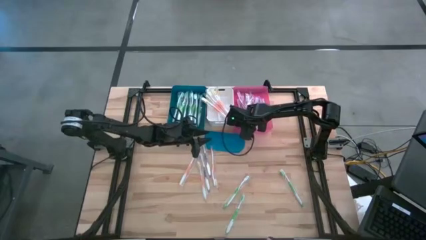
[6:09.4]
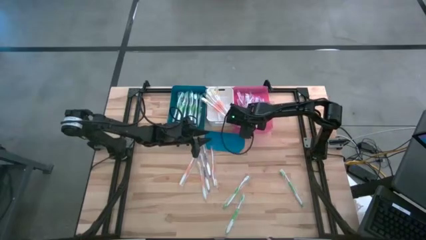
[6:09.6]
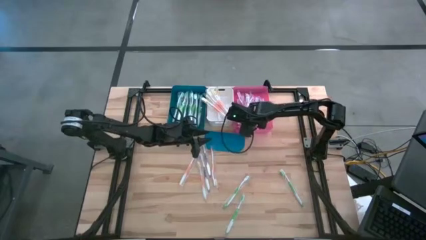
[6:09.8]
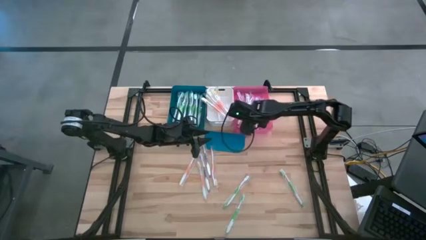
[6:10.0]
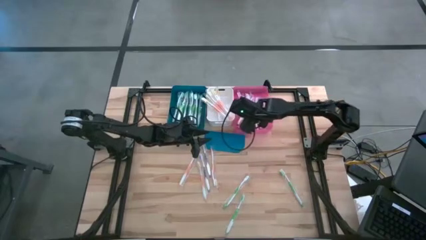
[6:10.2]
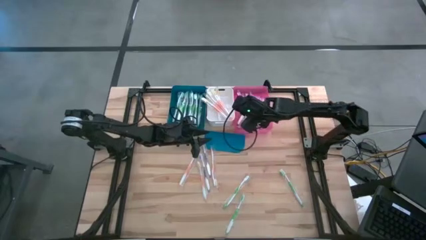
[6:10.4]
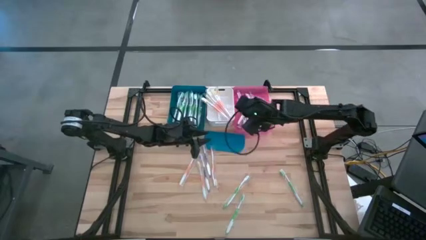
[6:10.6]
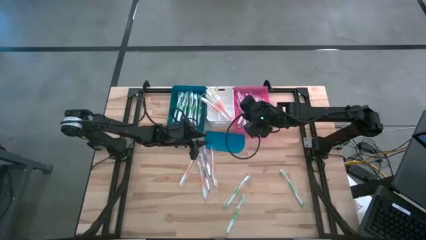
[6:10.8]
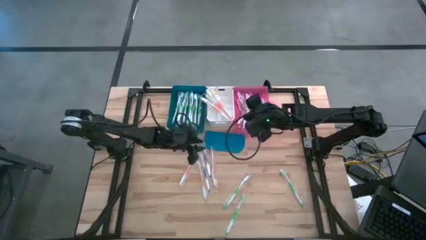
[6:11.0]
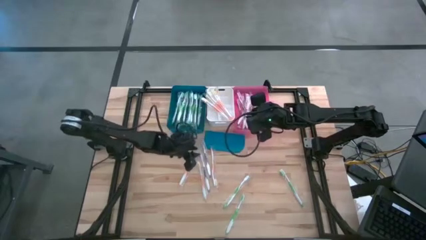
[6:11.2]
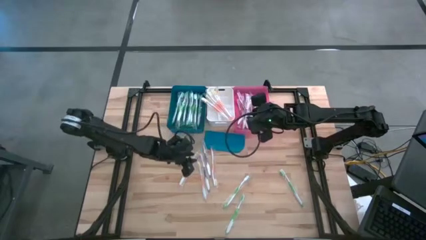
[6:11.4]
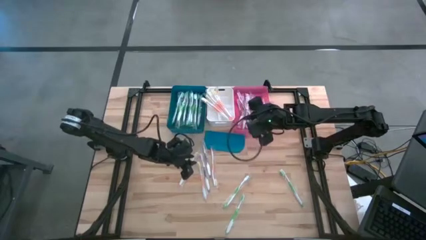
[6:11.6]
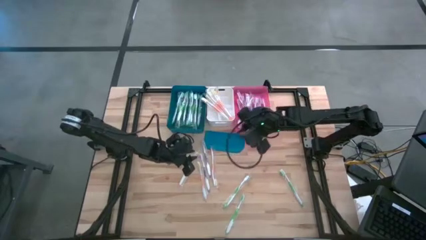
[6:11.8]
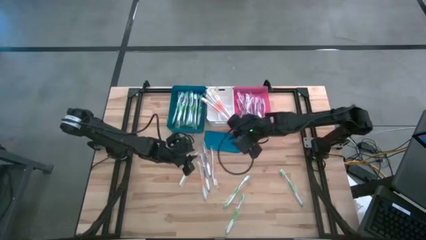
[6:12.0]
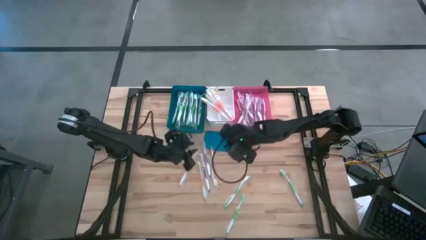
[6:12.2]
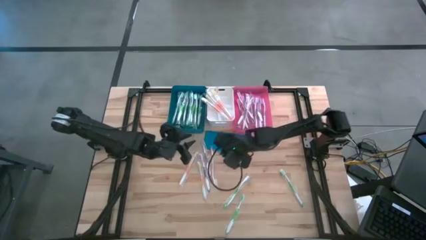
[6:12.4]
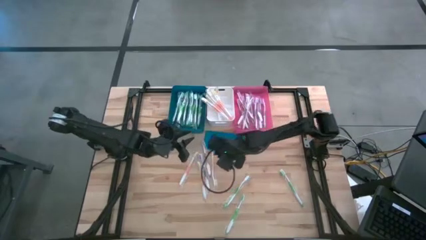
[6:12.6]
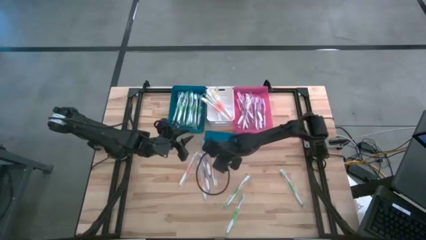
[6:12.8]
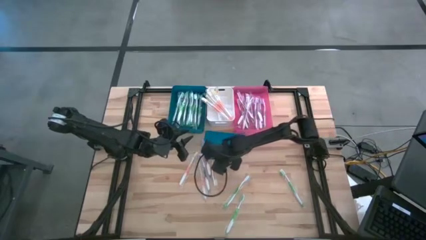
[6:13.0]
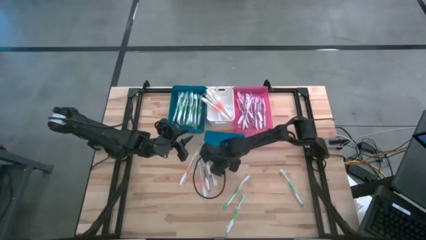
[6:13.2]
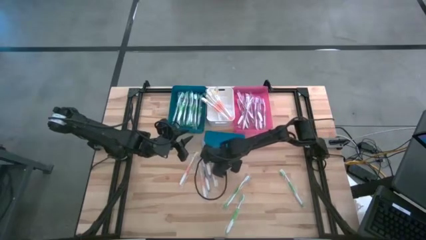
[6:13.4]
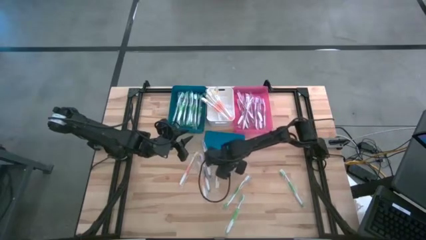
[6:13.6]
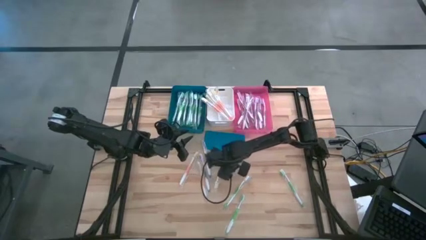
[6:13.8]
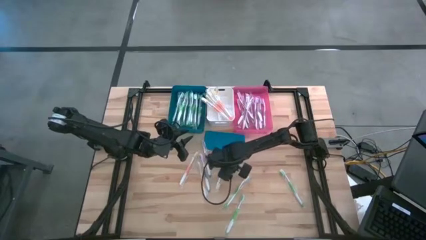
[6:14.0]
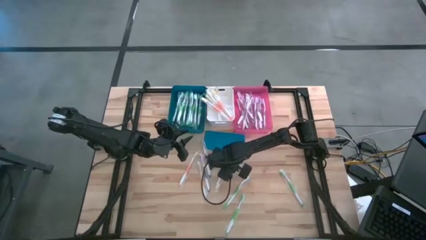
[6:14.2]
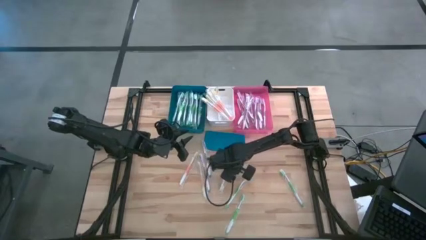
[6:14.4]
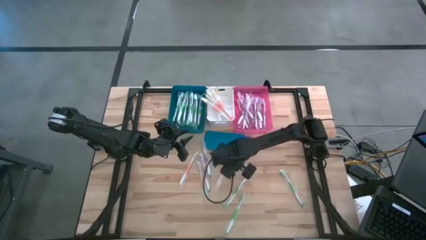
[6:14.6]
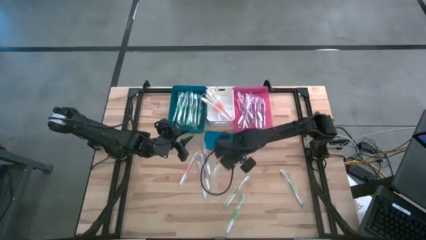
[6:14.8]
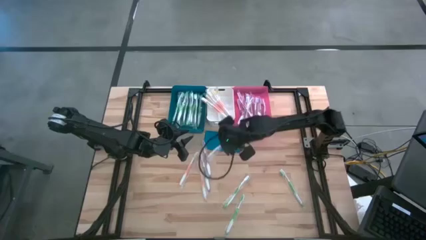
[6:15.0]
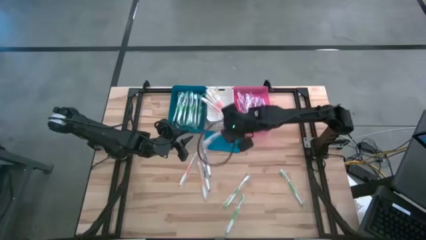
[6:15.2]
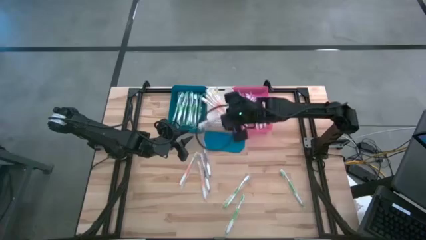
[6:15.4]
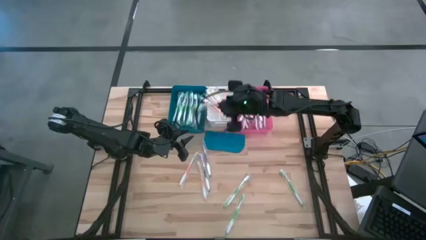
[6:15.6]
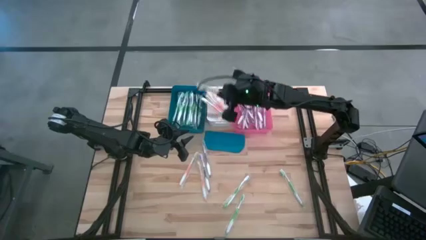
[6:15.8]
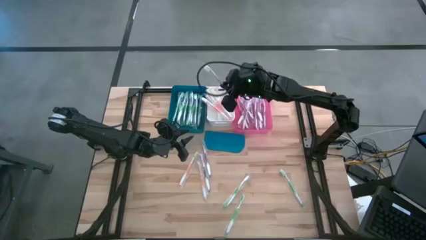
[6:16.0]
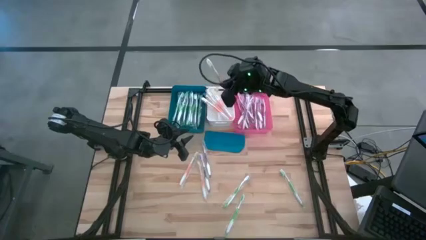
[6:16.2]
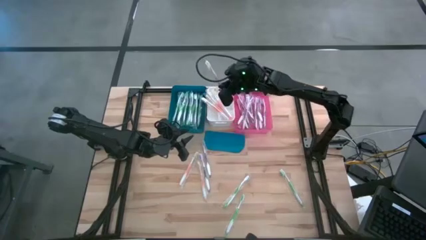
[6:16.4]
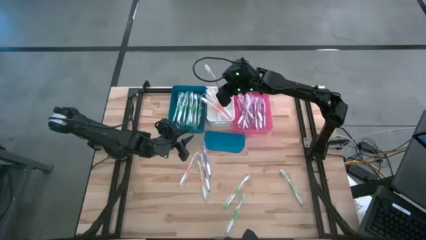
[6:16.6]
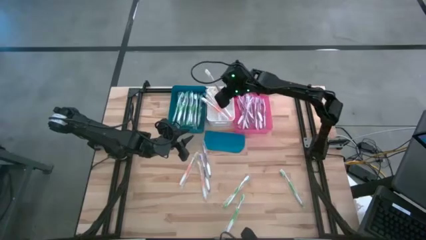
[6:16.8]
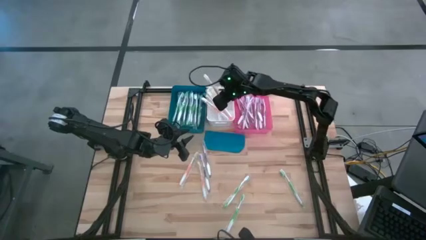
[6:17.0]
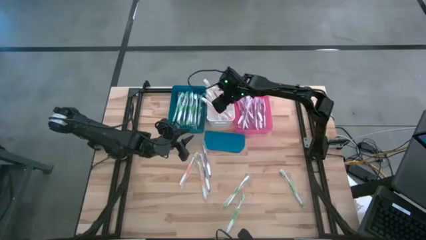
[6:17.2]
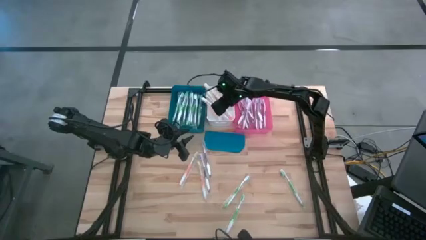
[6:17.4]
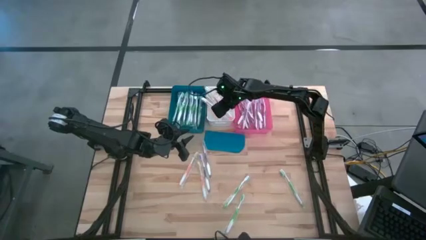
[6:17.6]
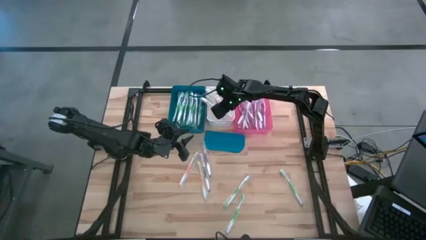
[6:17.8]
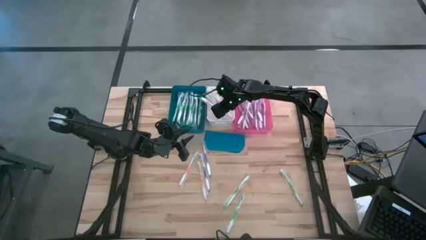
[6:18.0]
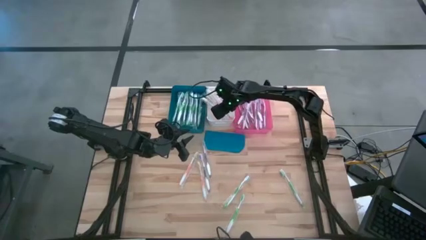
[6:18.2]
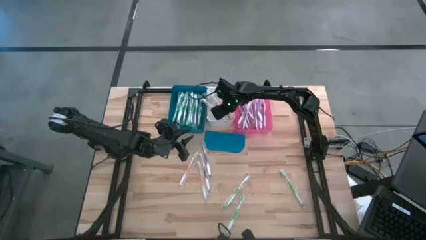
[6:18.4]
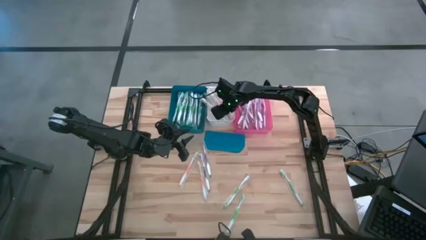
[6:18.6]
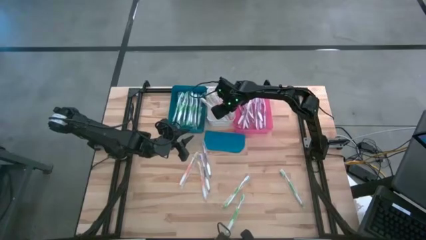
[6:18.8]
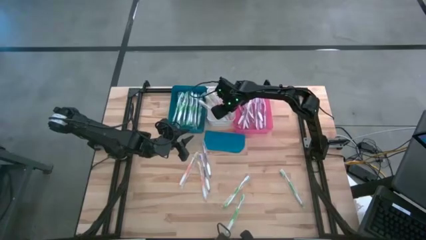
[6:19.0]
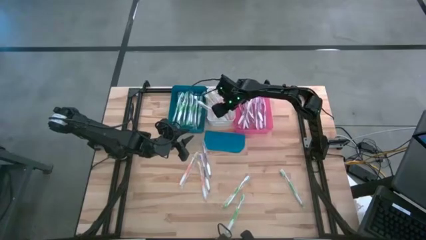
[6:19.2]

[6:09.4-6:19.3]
Task: Pick & Place Toothbrushes
Put the right orange toothbrush into the white bin

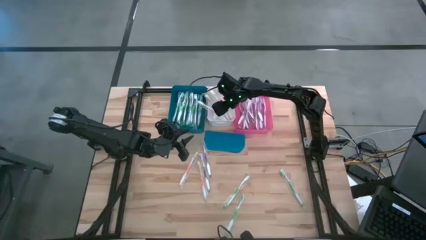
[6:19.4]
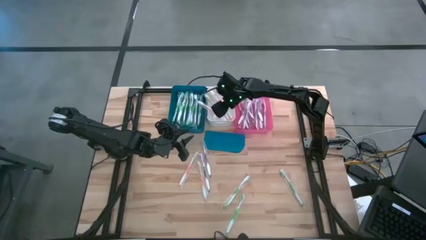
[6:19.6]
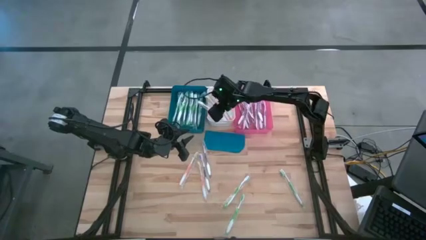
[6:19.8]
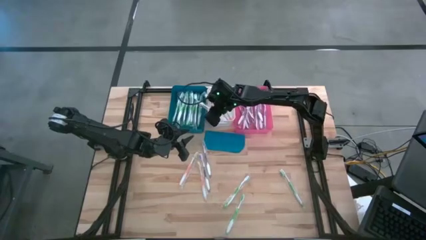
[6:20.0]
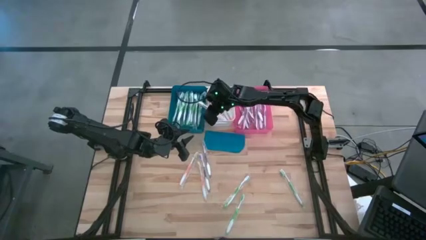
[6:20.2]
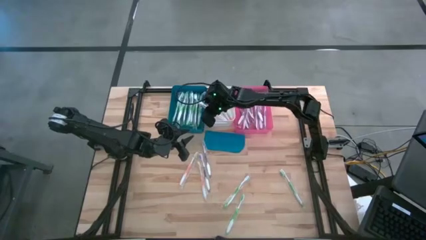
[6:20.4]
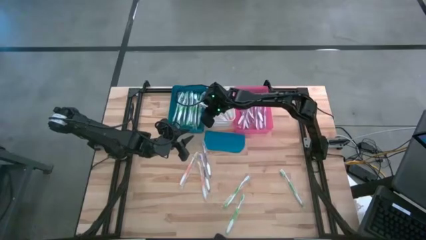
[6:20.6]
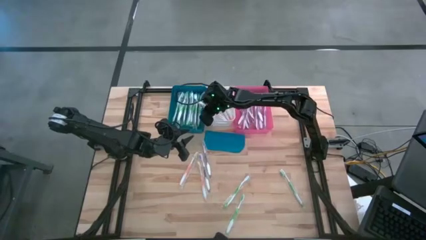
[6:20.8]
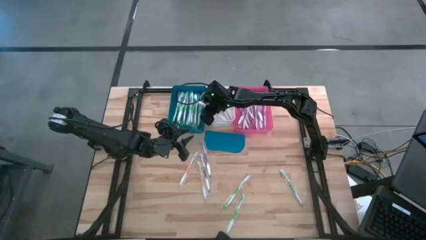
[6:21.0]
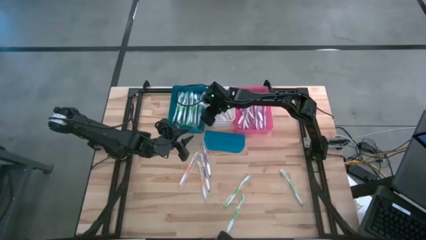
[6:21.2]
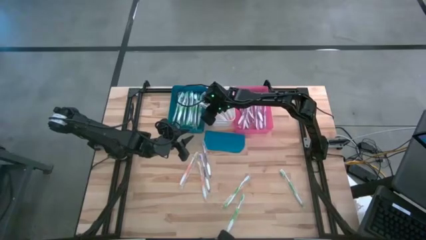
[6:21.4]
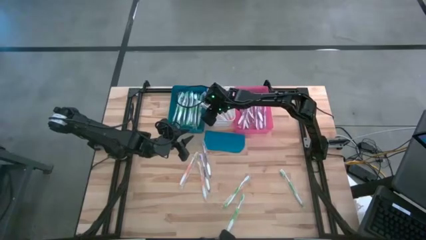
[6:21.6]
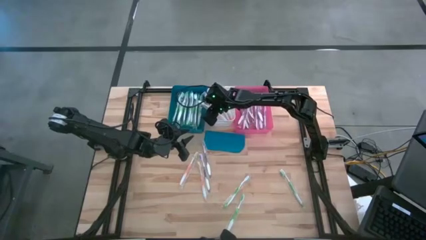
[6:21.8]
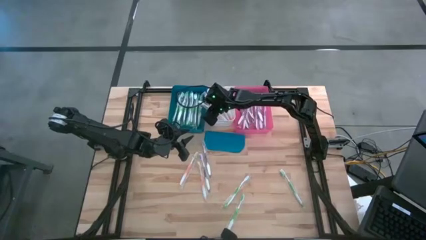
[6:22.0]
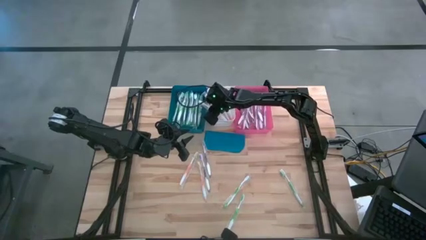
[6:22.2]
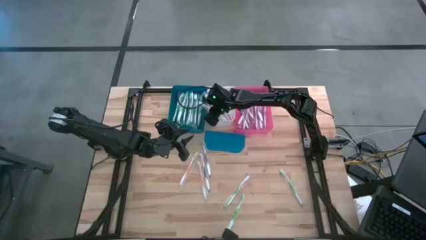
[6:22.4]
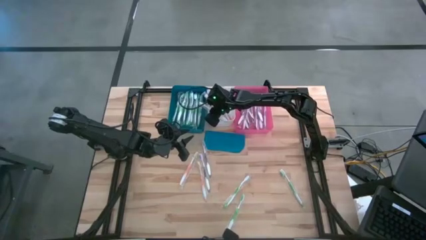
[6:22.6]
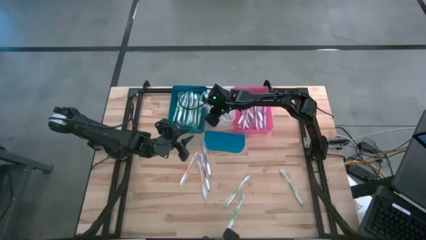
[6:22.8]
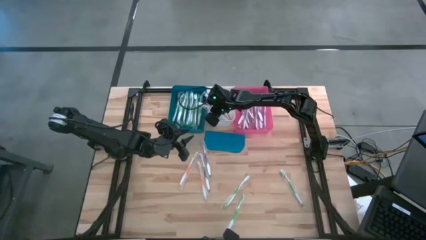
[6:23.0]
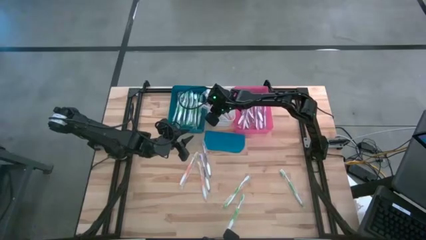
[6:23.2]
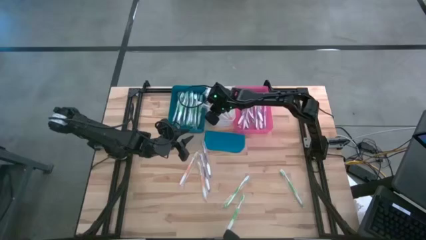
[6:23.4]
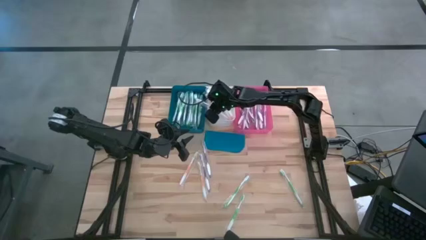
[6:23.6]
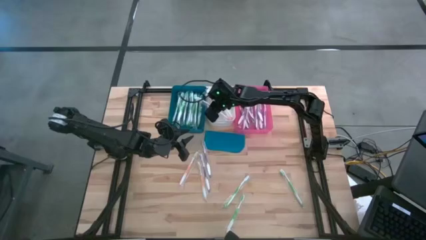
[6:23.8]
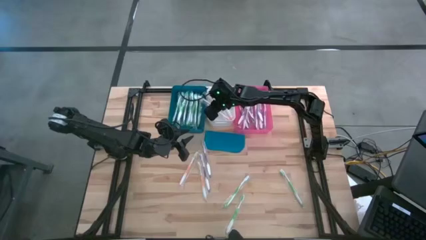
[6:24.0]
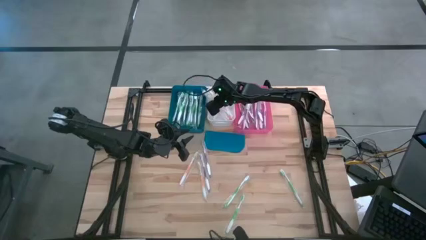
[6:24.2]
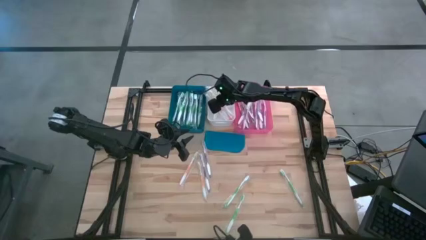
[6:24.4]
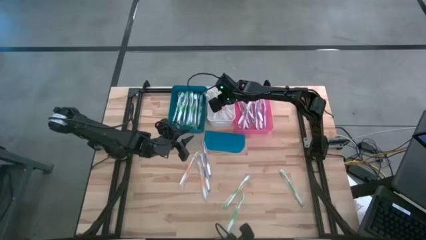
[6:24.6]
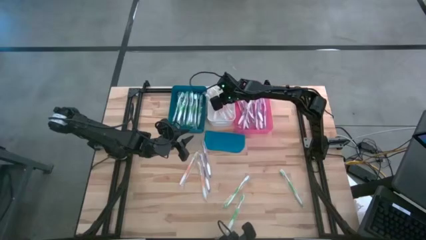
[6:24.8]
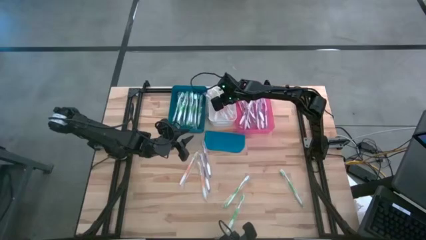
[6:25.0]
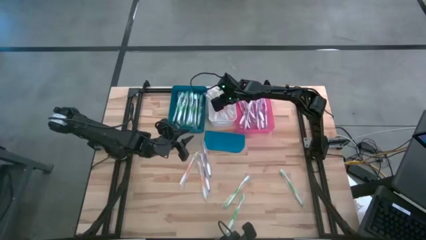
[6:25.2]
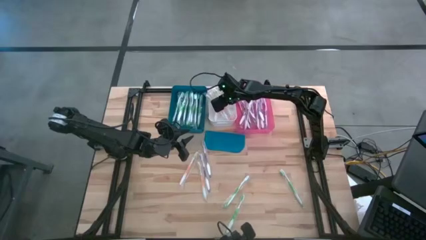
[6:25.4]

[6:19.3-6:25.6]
Adjust the orange toothbrush into the white bin
